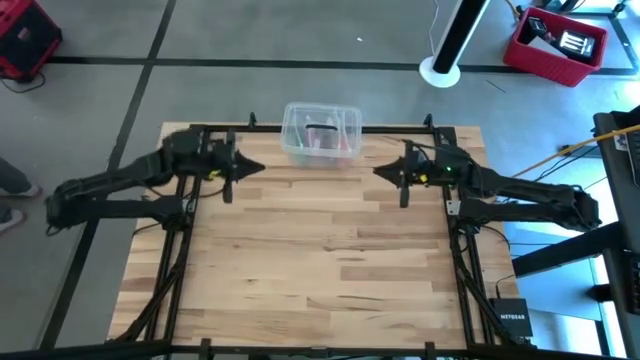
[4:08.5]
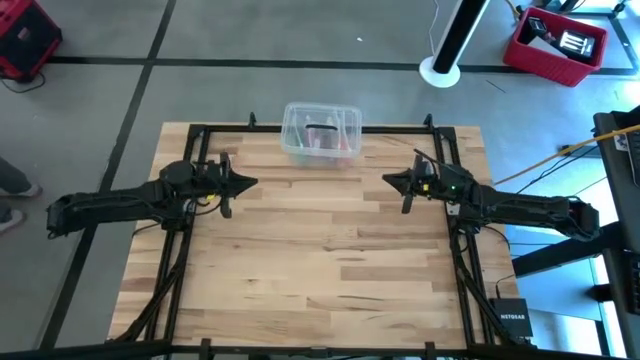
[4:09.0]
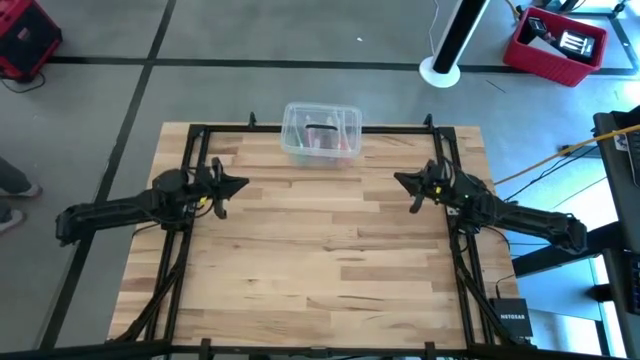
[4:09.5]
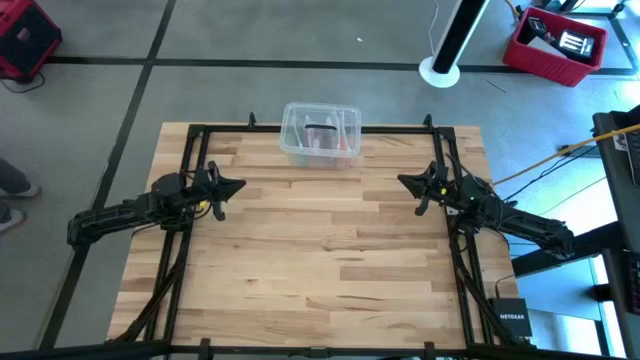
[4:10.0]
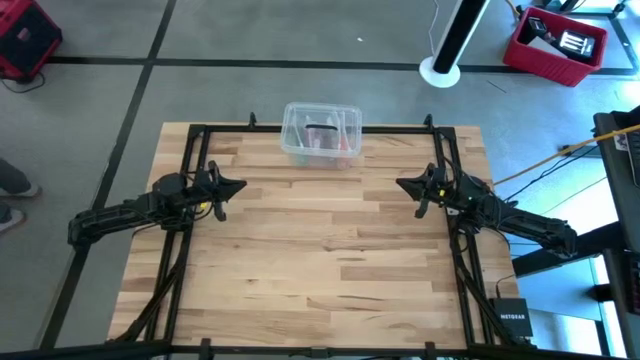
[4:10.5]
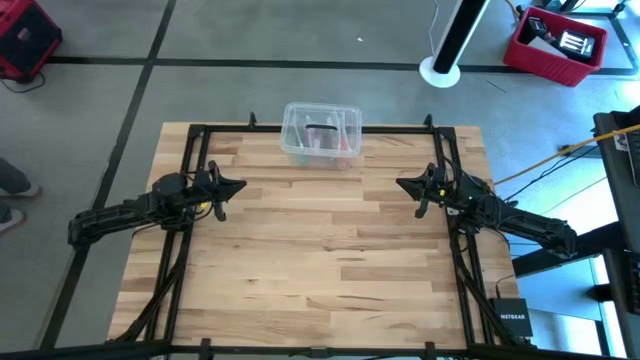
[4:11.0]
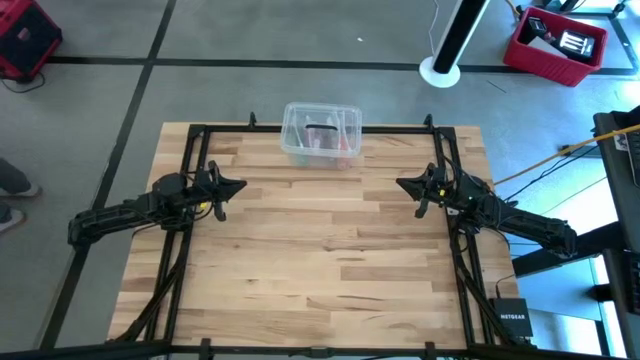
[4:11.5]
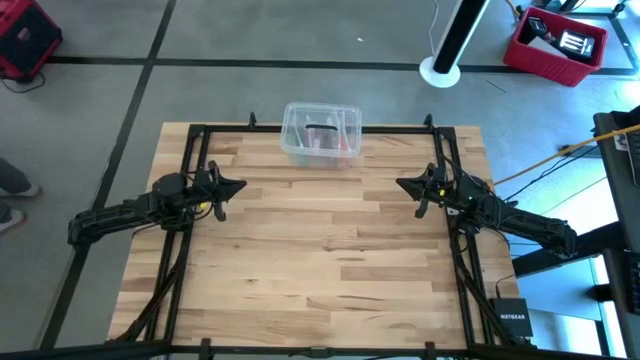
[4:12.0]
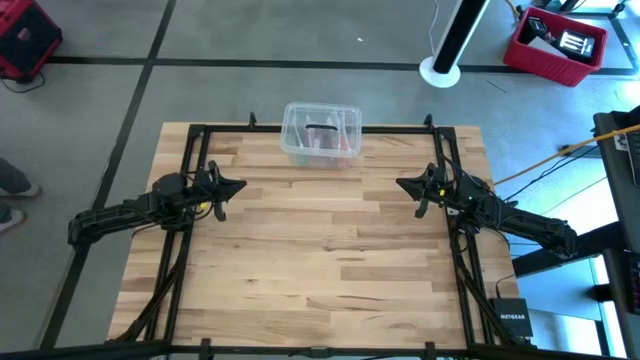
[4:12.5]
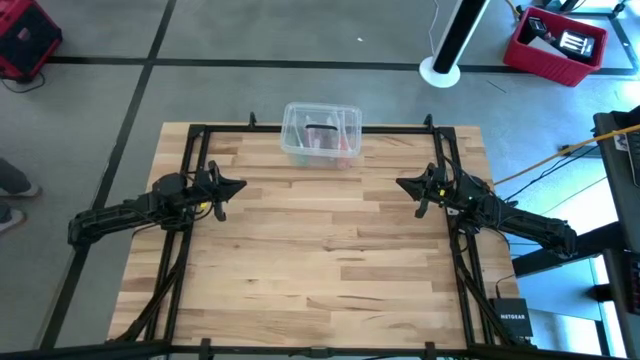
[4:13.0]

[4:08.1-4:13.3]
Task: Roll bandage
Return to Home Position

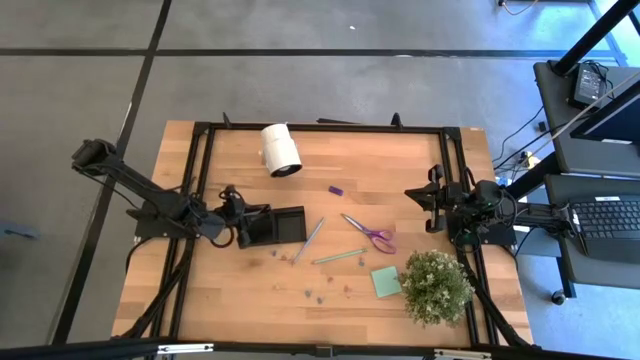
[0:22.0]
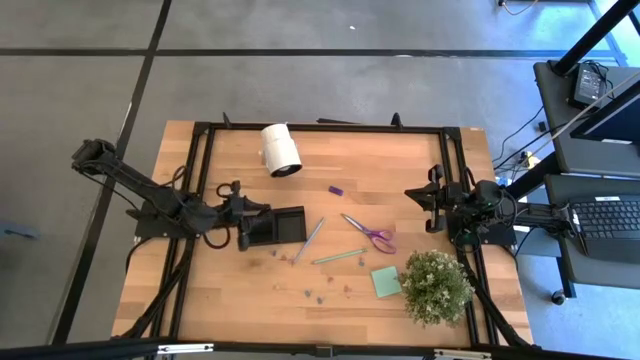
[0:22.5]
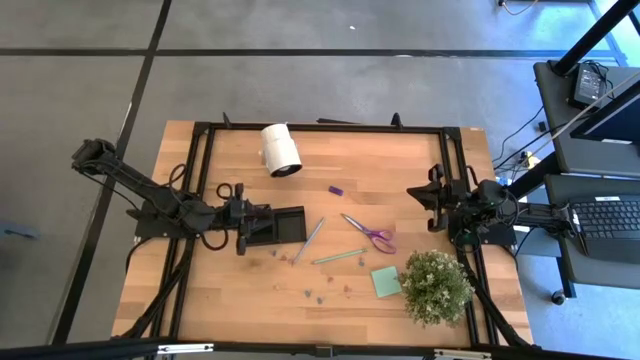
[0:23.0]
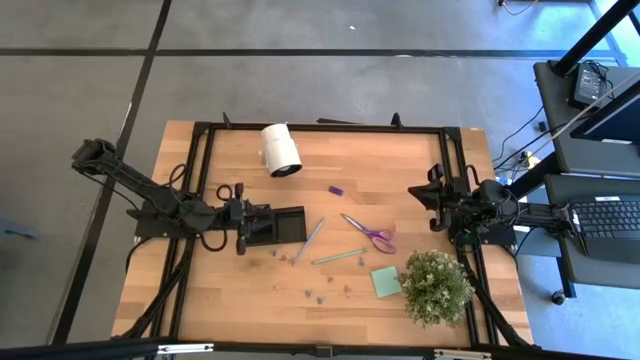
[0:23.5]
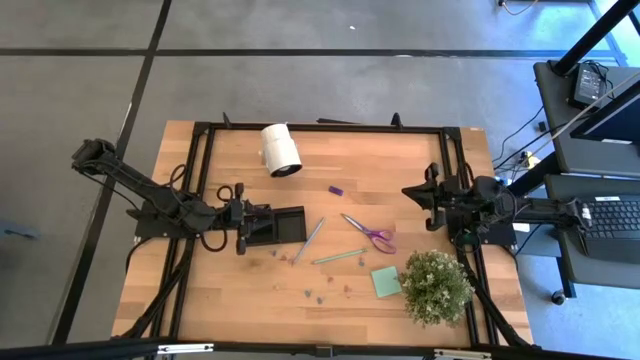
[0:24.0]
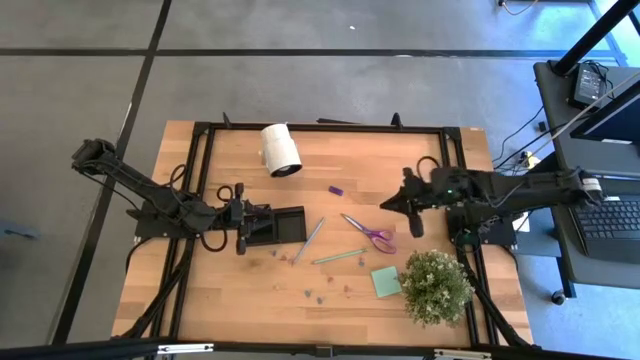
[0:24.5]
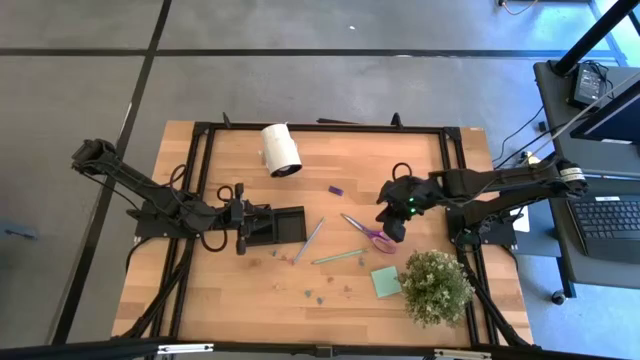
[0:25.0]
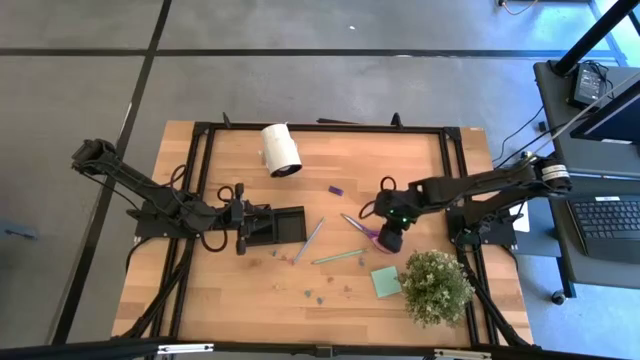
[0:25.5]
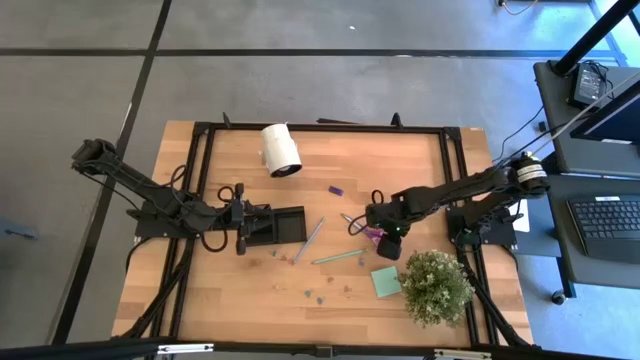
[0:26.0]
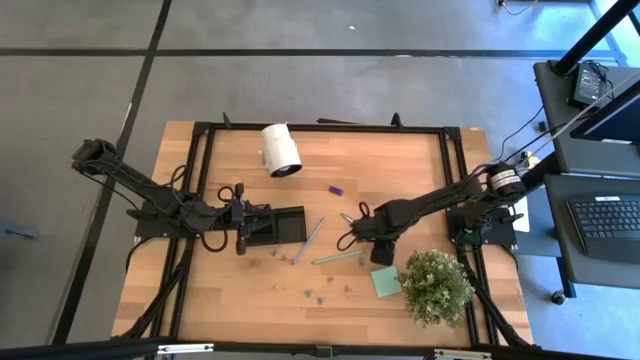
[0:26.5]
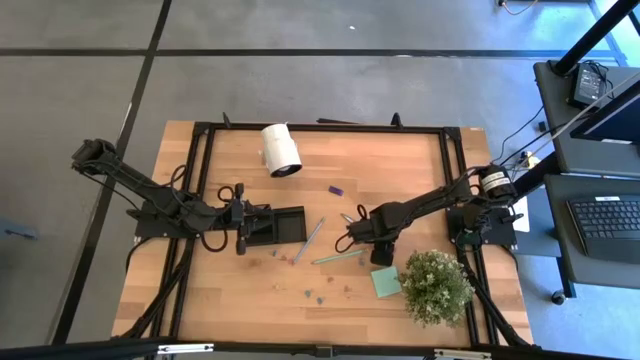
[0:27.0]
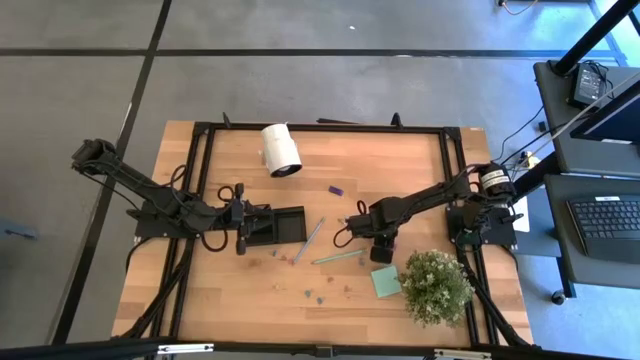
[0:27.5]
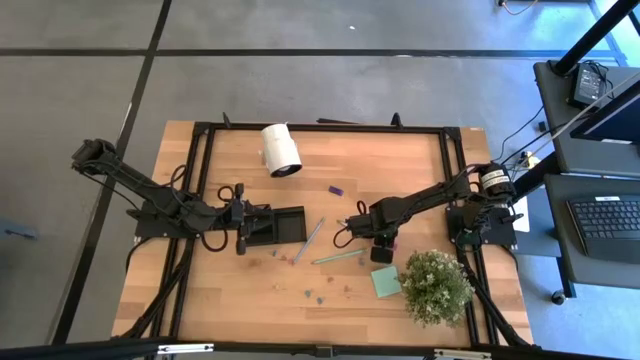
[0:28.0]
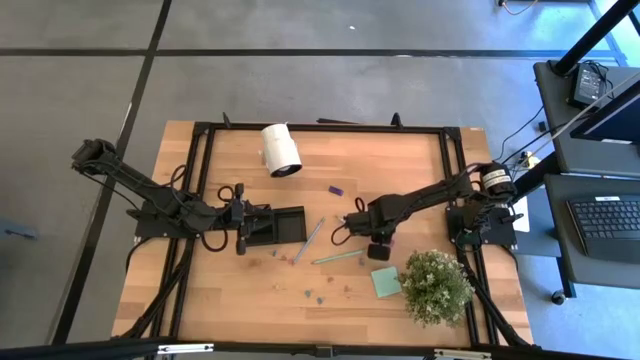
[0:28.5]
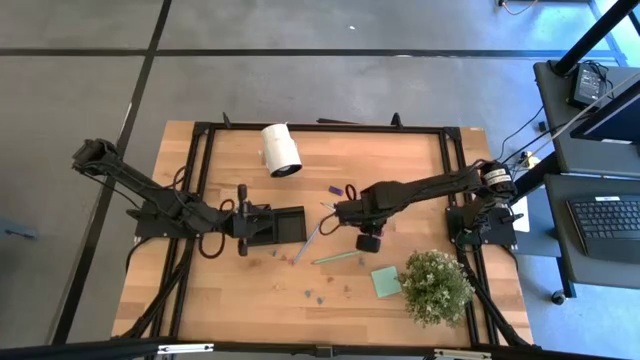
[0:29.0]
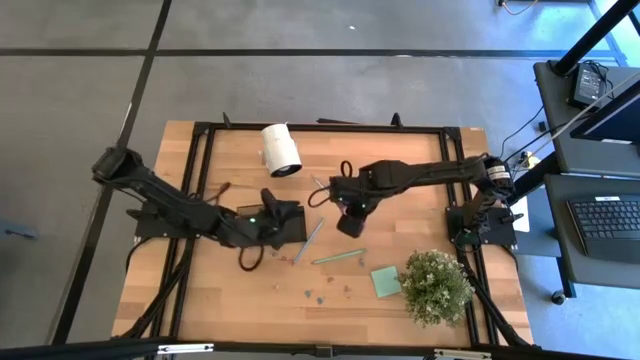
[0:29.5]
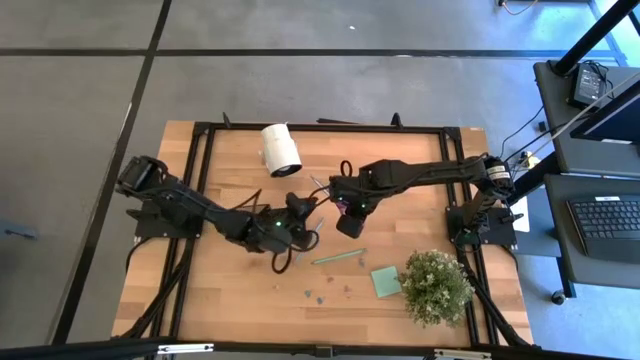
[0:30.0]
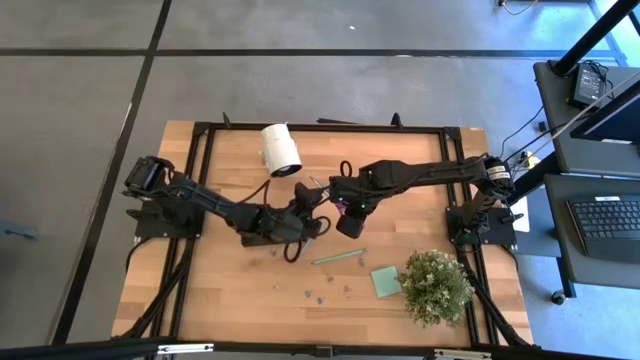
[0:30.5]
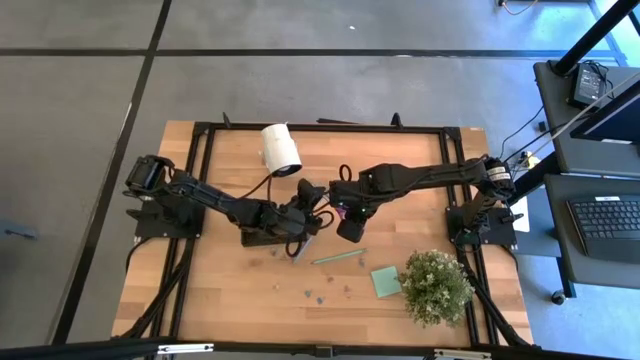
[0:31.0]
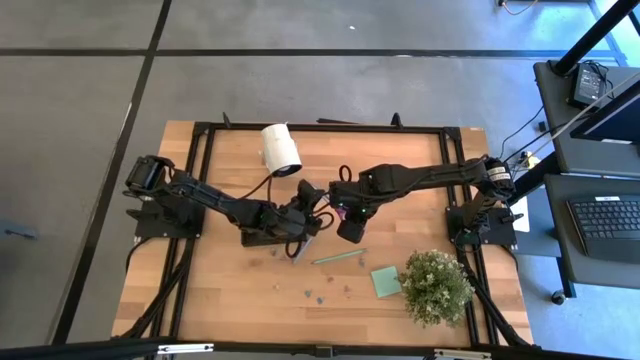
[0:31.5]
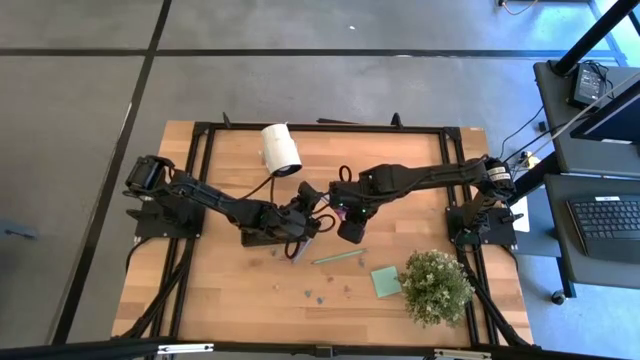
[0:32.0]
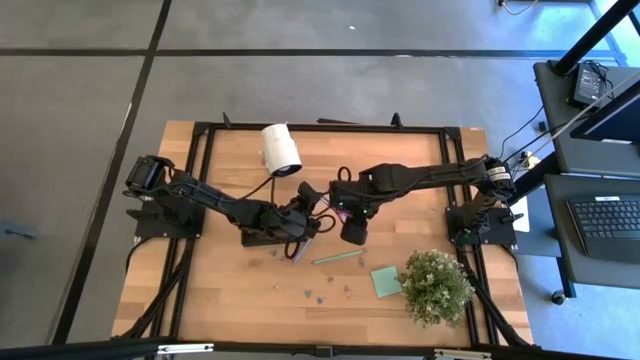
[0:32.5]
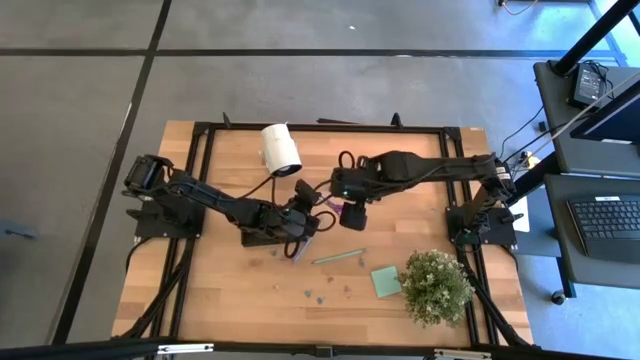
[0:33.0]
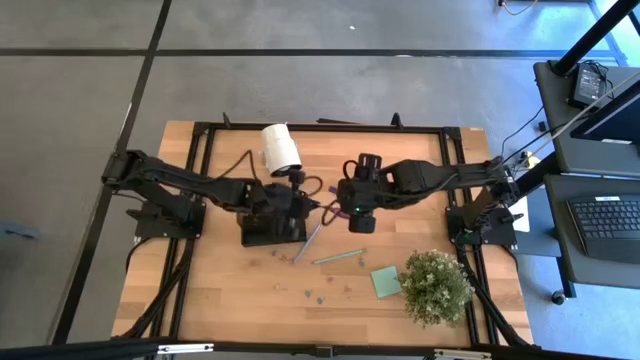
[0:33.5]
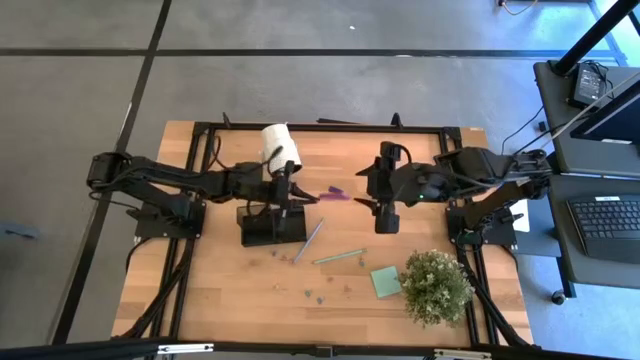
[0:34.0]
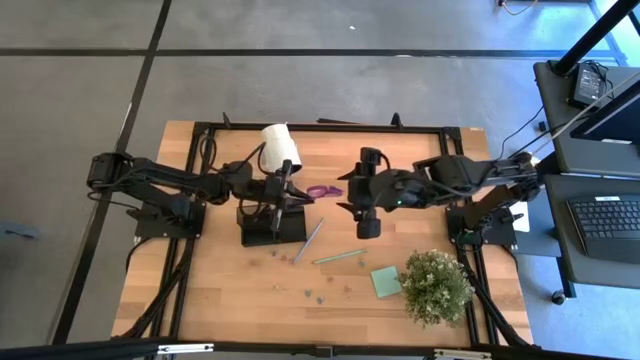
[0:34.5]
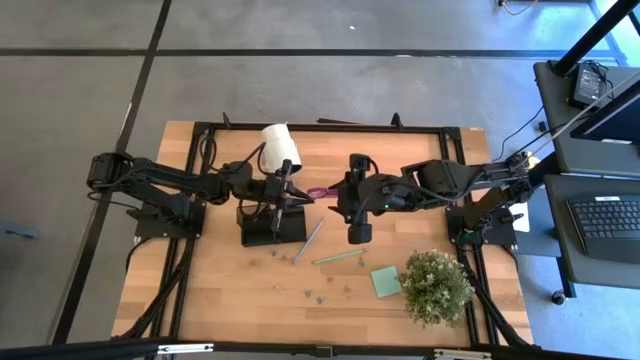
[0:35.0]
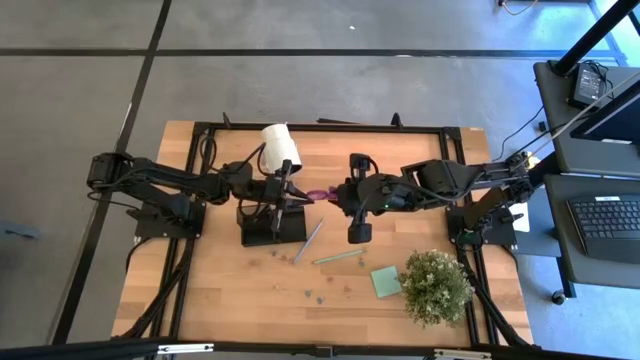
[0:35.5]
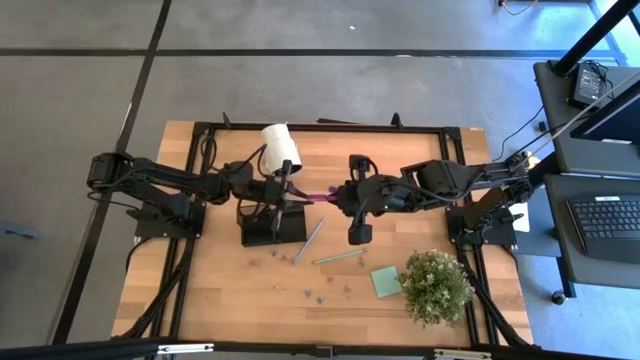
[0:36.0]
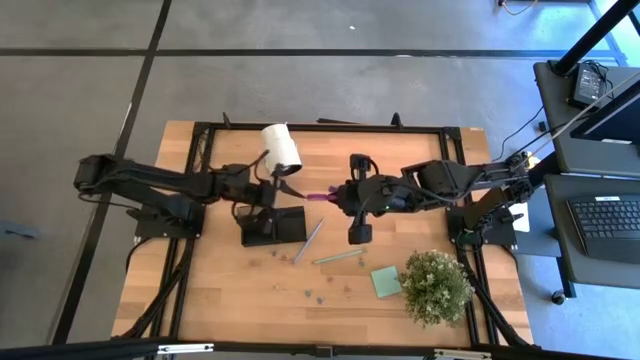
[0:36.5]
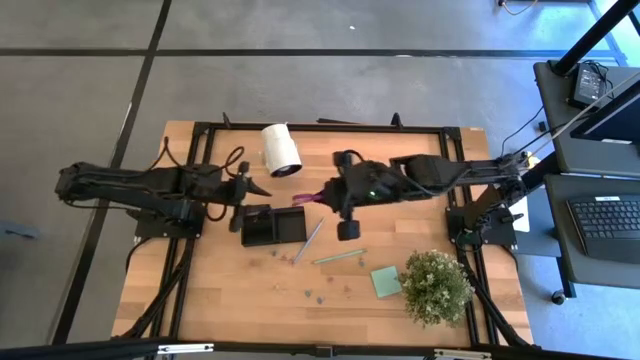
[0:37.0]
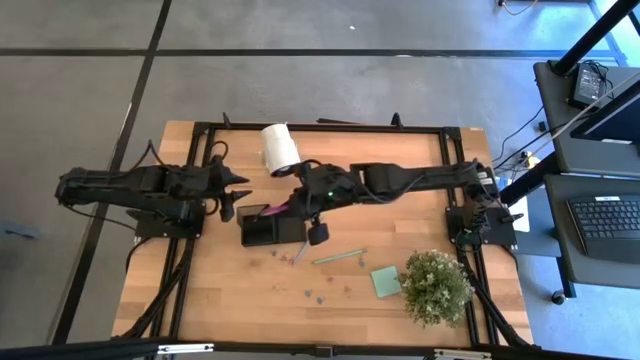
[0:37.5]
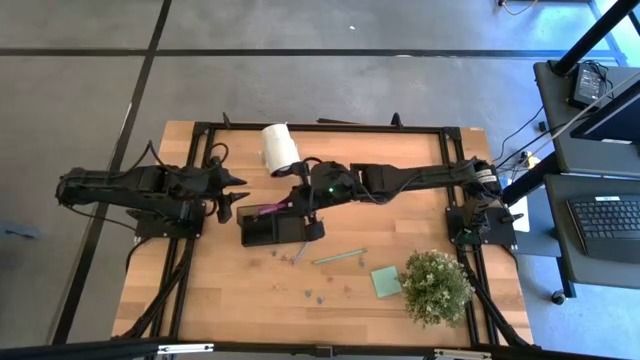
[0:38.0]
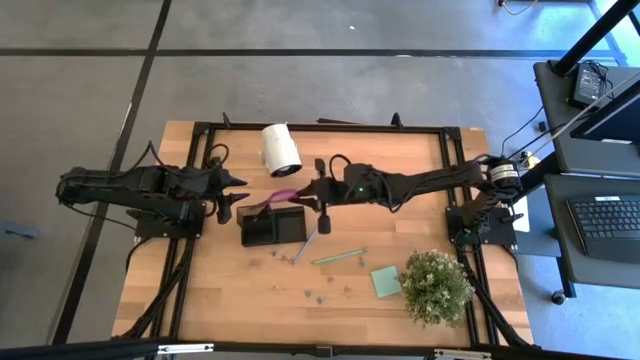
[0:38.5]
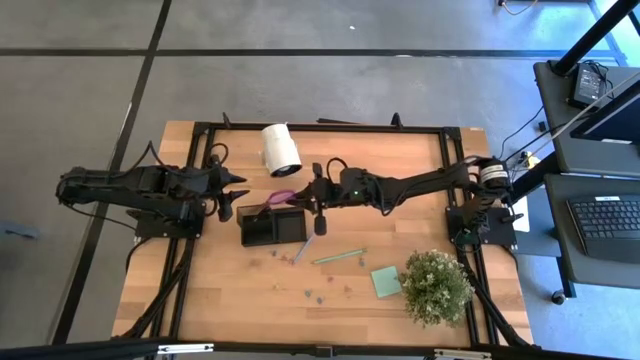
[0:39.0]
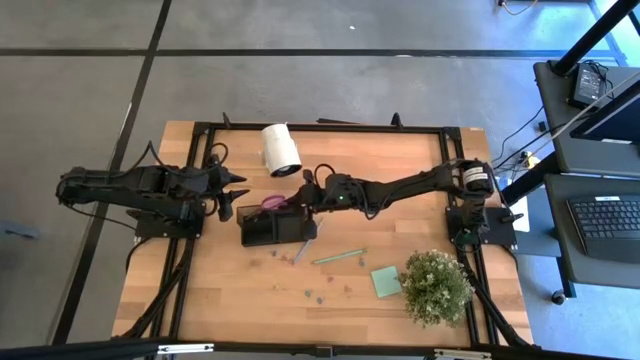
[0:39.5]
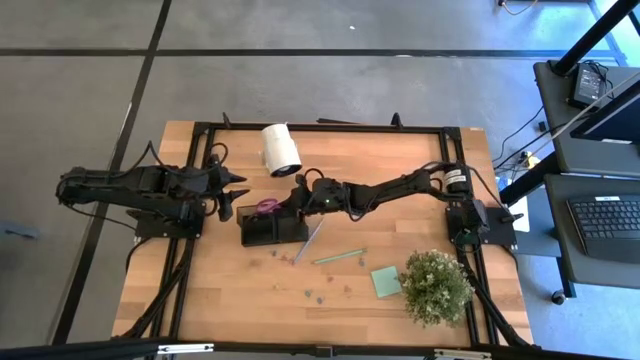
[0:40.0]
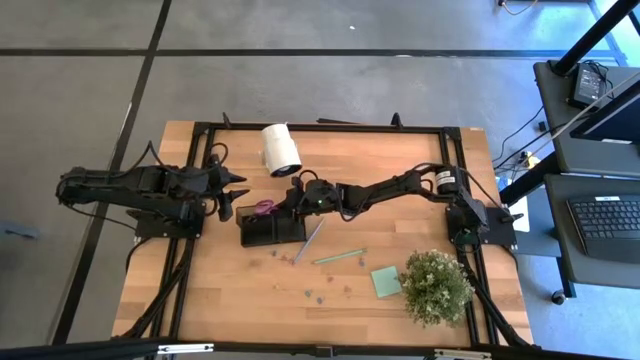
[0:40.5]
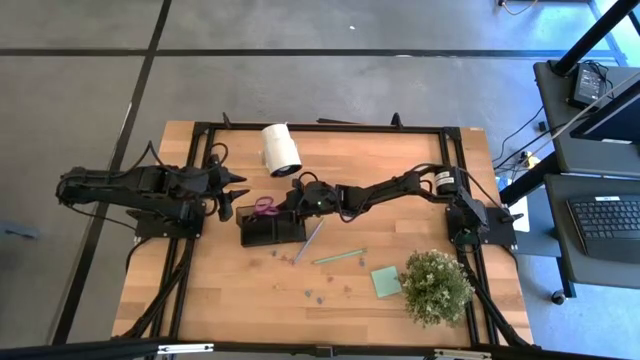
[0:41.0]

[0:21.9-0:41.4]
Task: Pick and place office supplies into organizer
Put the purple scissors into the black desk organizer
